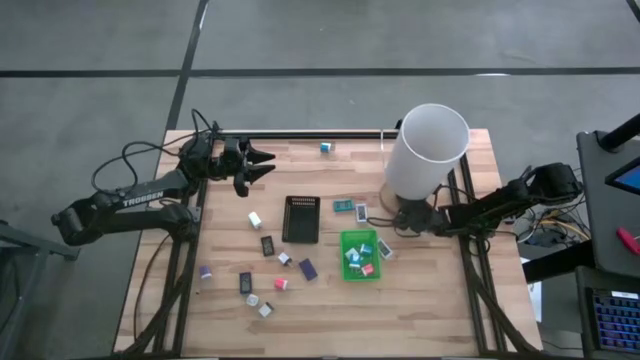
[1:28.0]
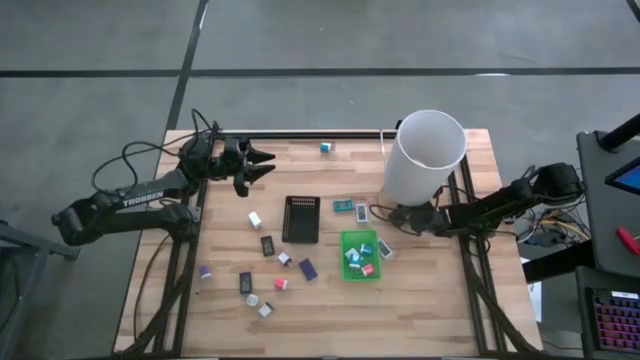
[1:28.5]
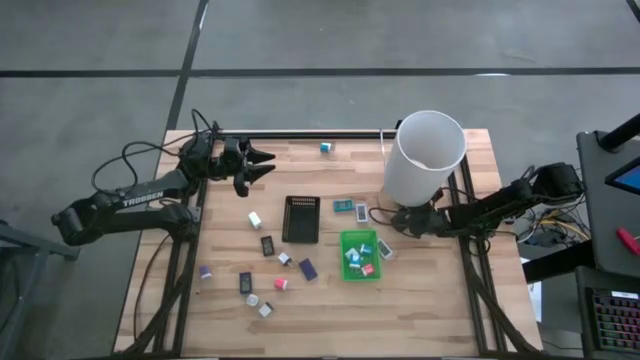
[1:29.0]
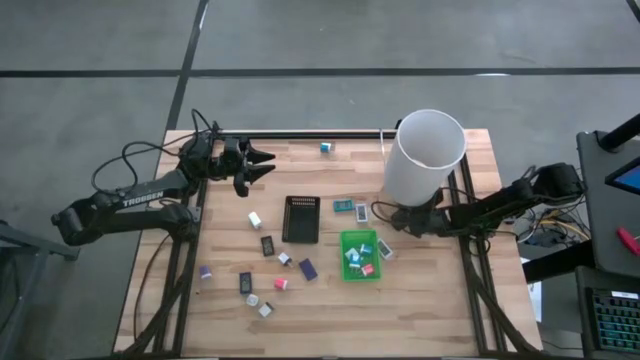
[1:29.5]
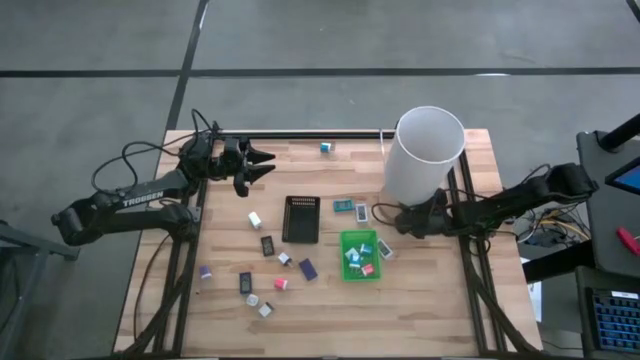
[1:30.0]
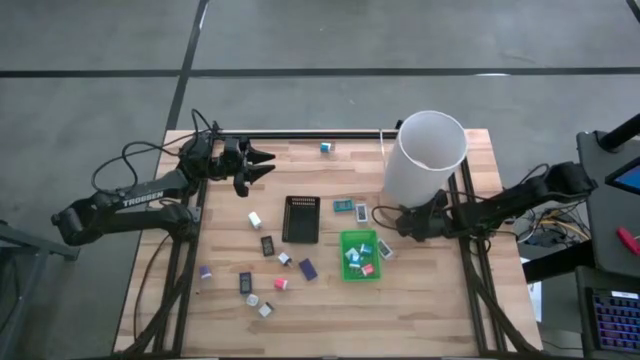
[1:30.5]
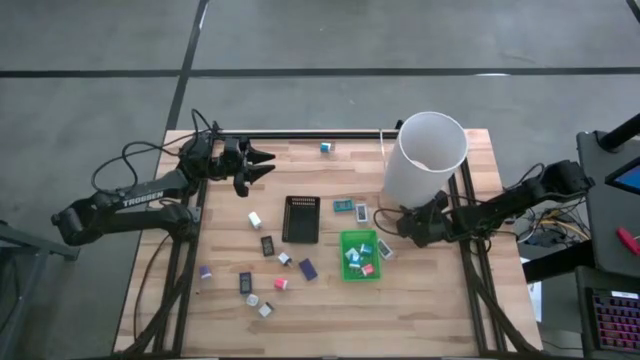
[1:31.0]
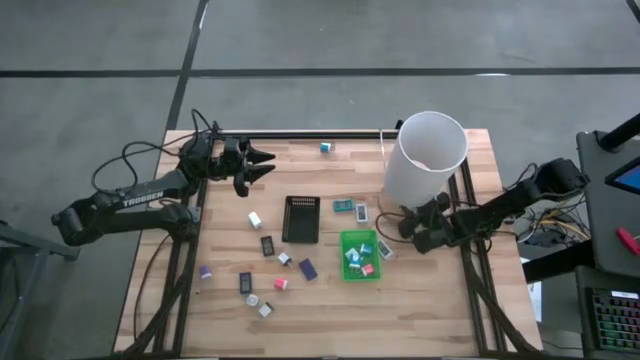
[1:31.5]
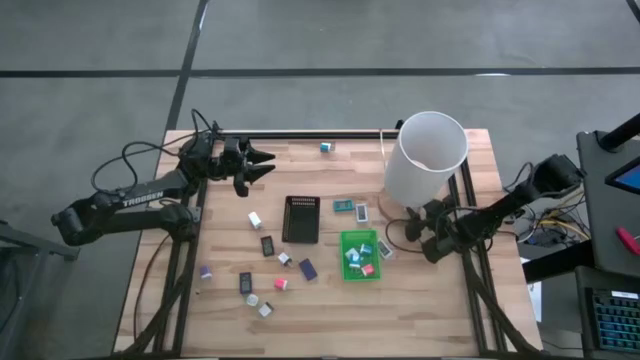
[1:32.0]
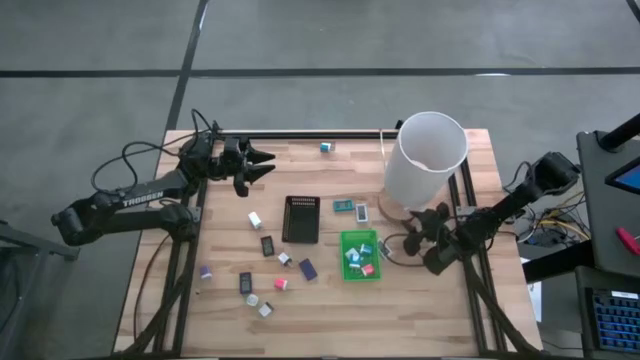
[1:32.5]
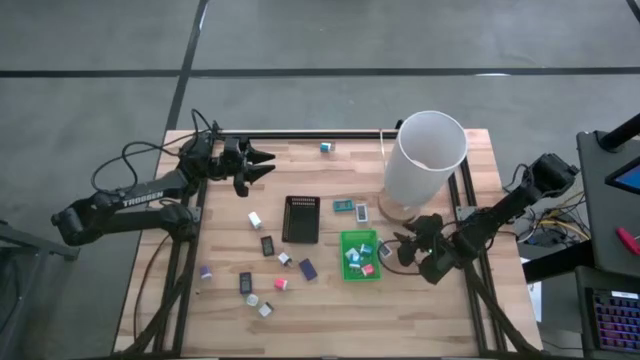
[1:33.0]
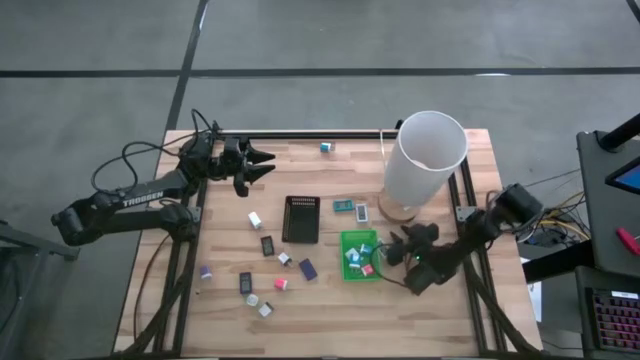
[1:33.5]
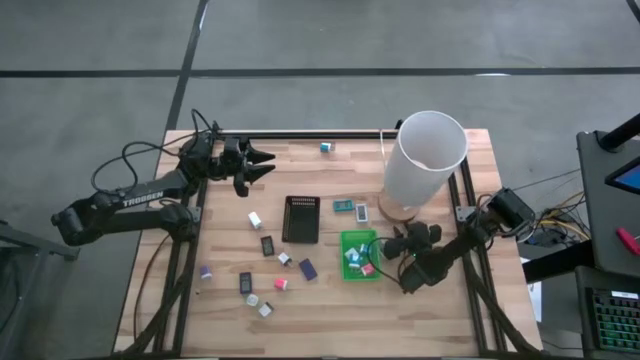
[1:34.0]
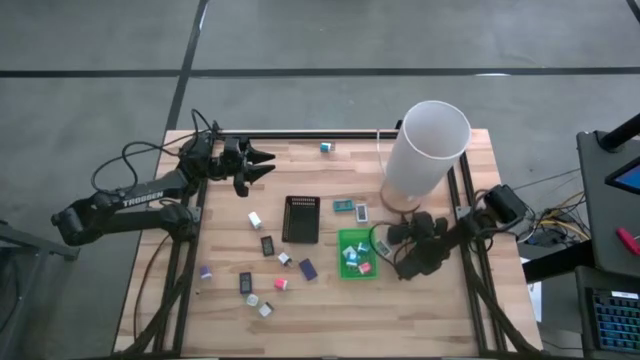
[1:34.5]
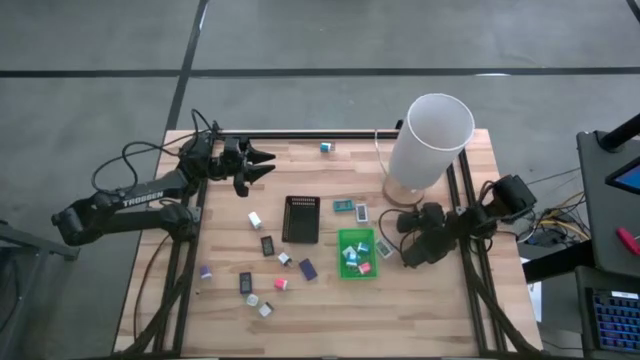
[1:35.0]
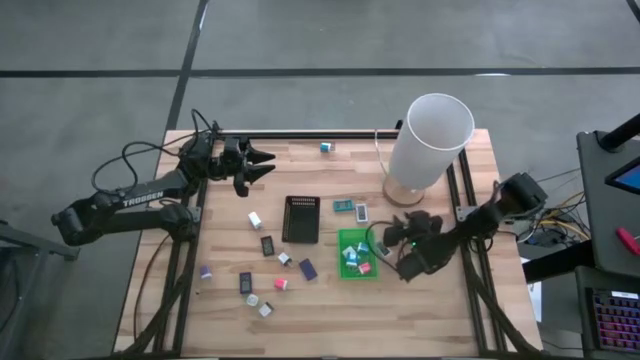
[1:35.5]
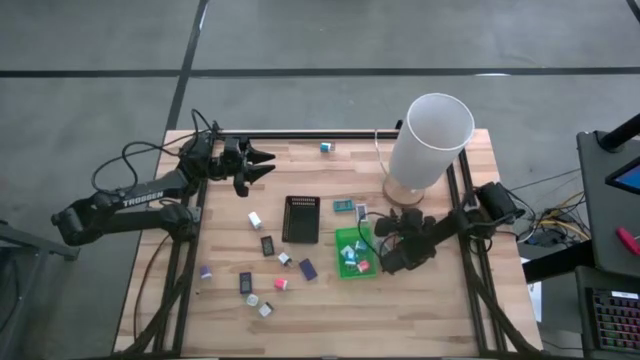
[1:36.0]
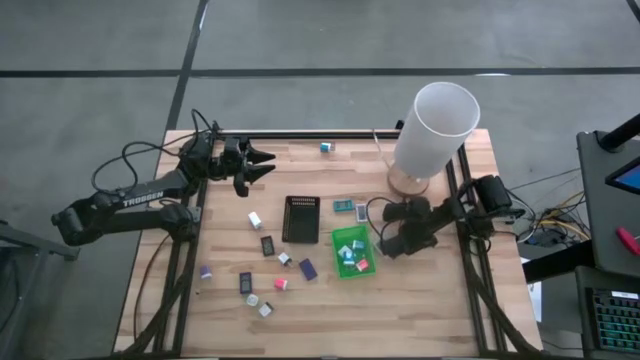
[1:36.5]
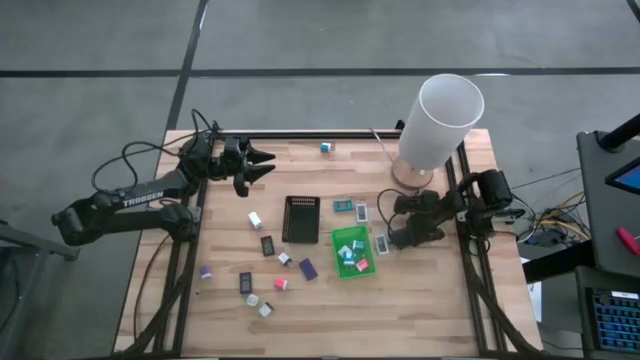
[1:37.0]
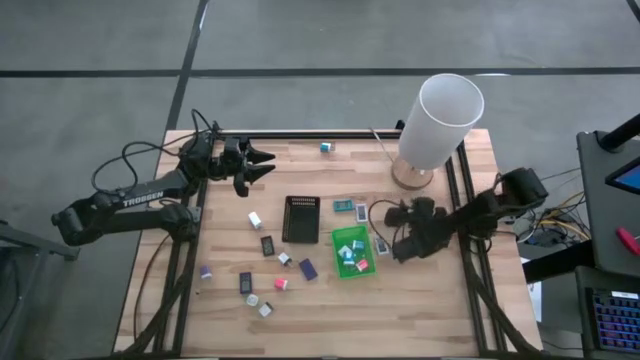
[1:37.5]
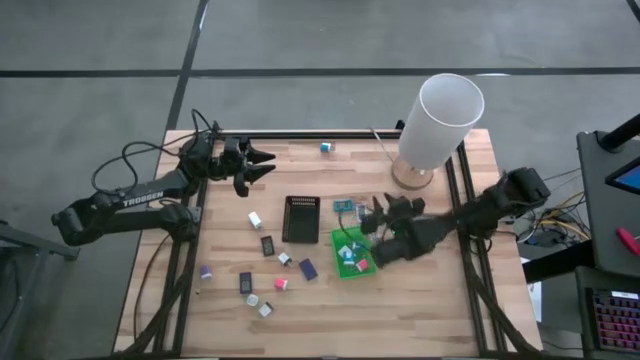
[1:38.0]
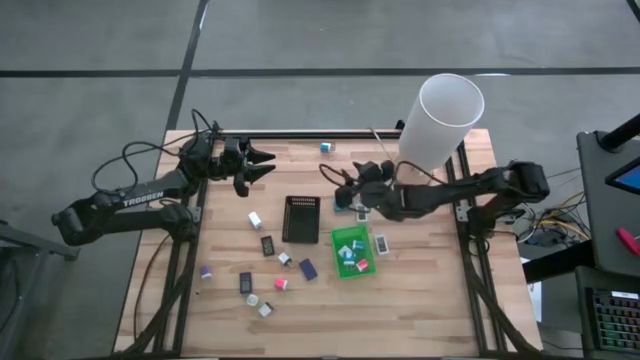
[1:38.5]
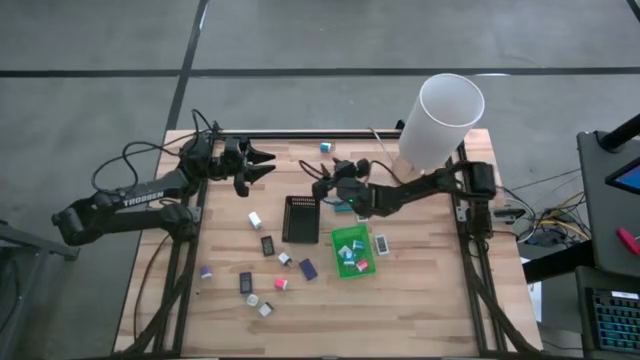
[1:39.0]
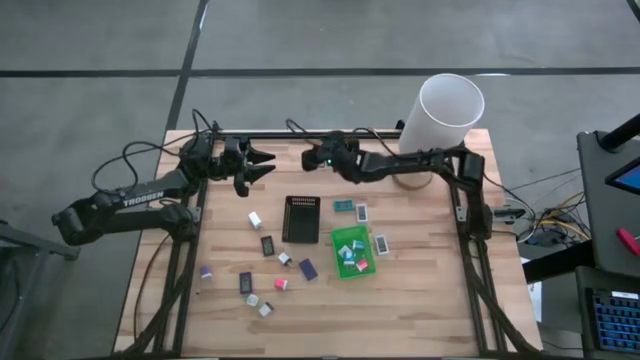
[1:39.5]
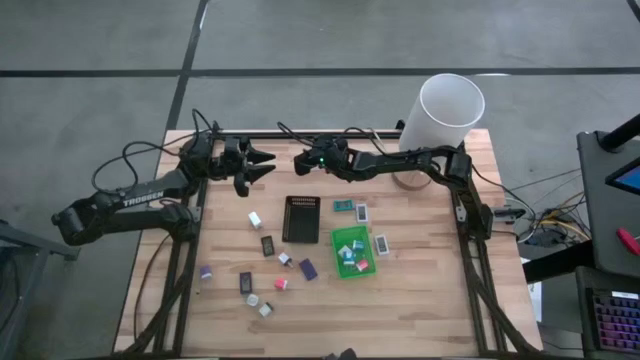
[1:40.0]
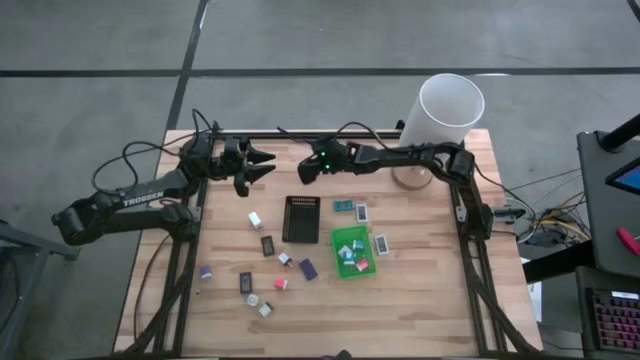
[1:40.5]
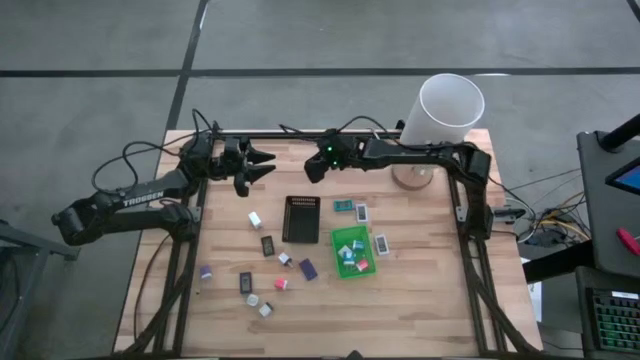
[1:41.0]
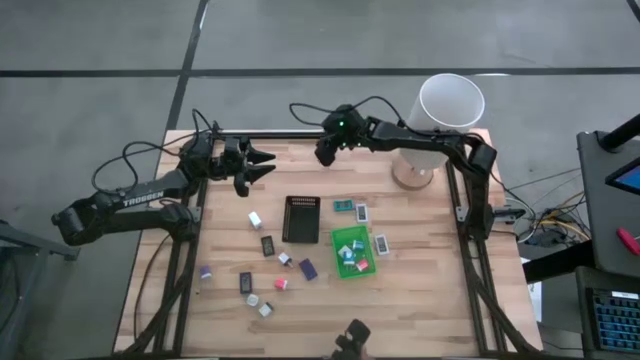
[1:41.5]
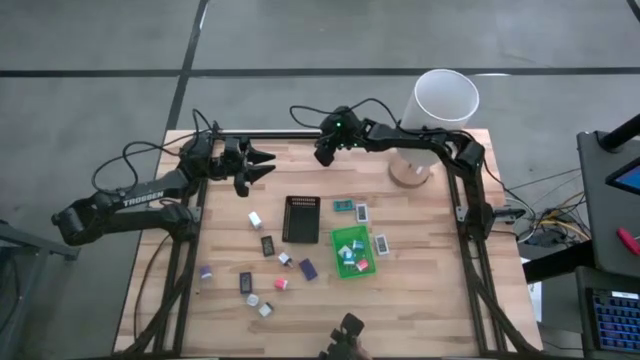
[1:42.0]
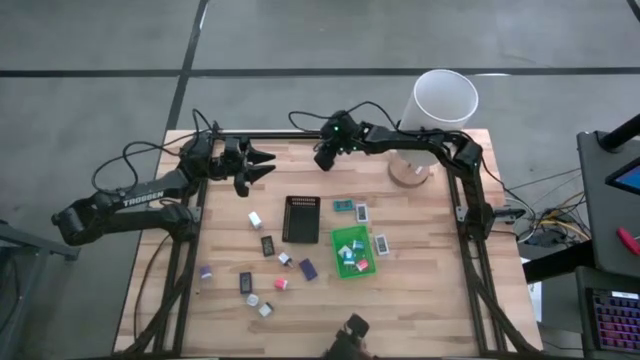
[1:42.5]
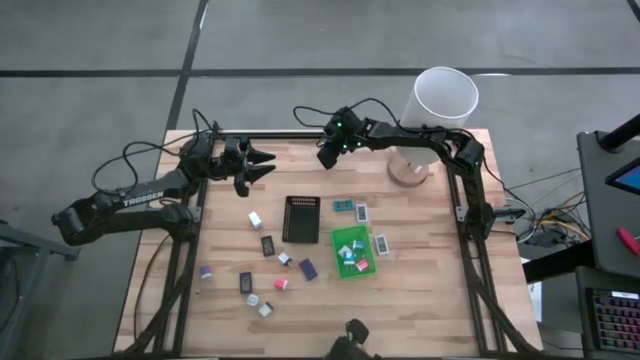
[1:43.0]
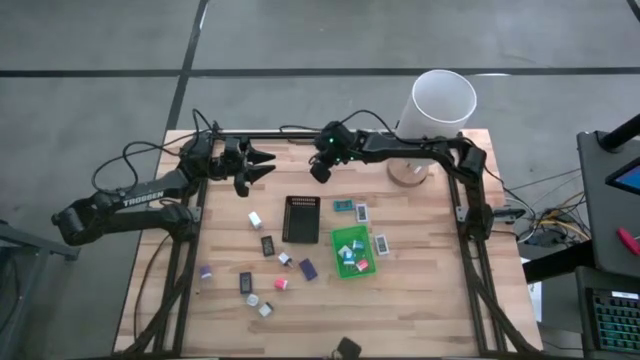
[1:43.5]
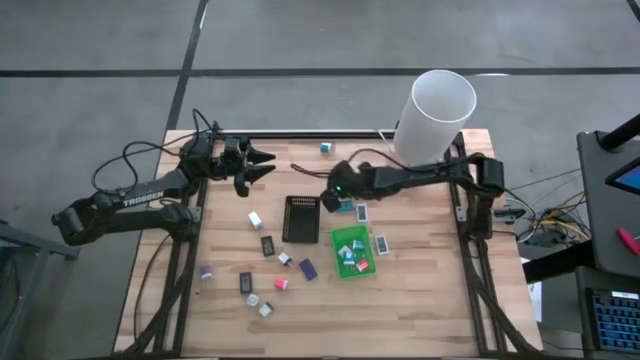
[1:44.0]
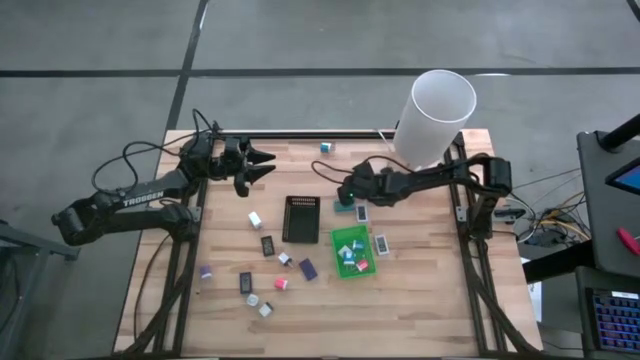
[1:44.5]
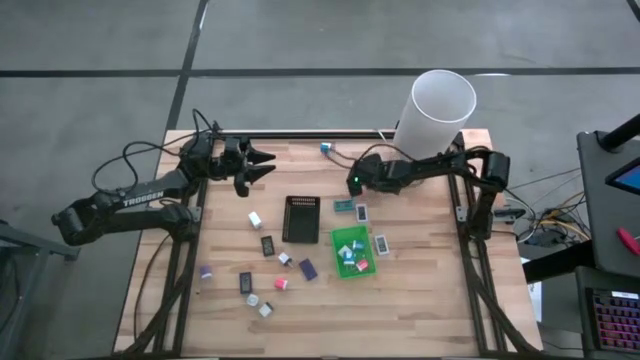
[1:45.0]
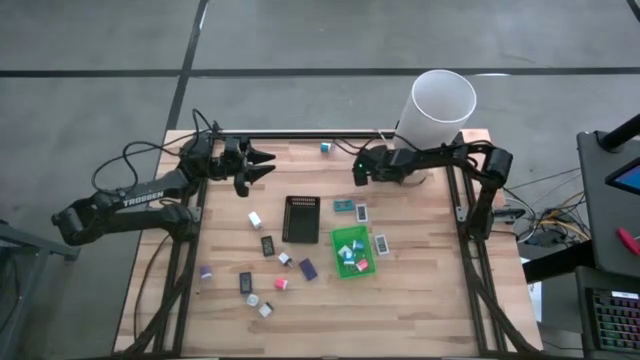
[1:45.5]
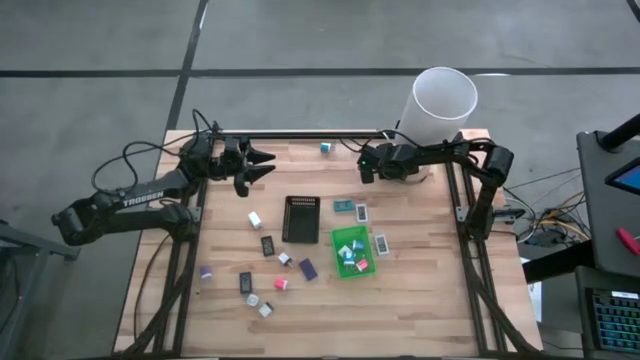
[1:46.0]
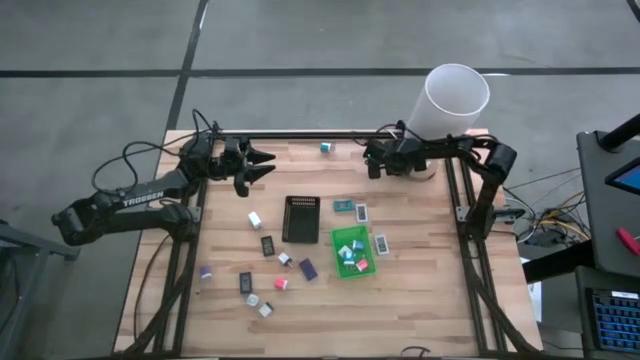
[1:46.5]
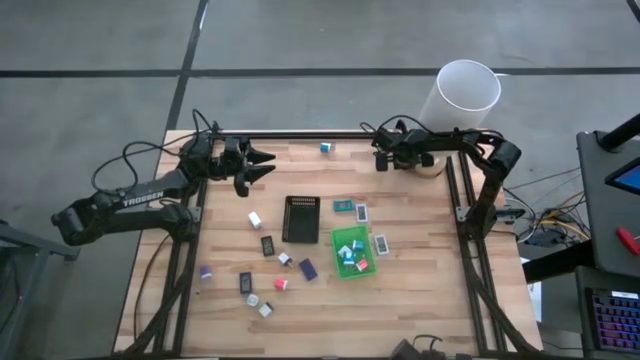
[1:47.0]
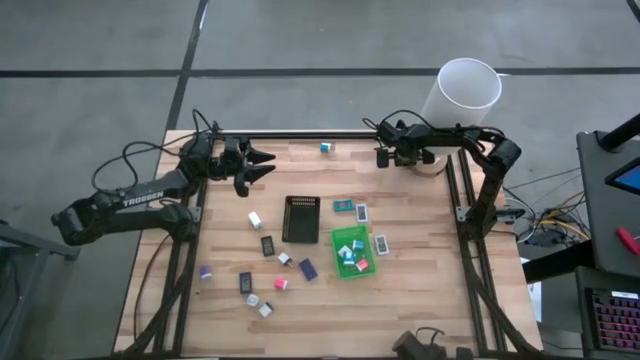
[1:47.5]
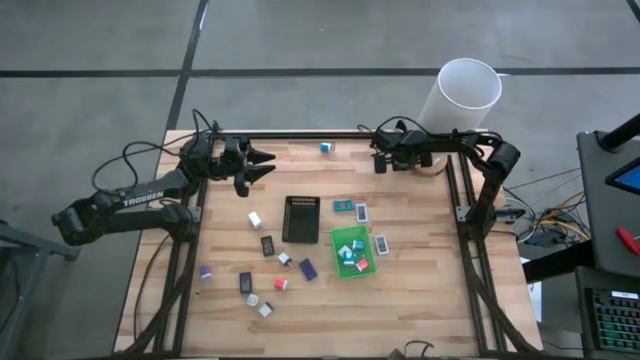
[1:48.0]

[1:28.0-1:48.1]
Task: Pick & Place Office items
Adjust the white lamp

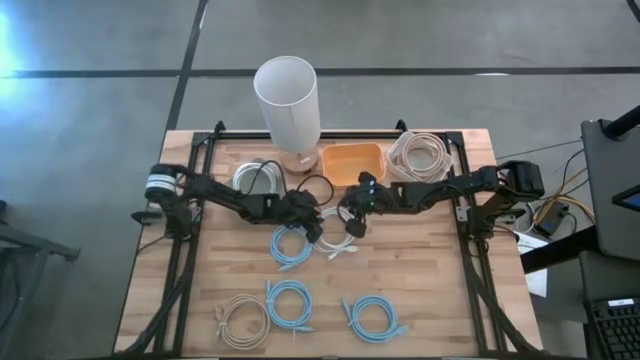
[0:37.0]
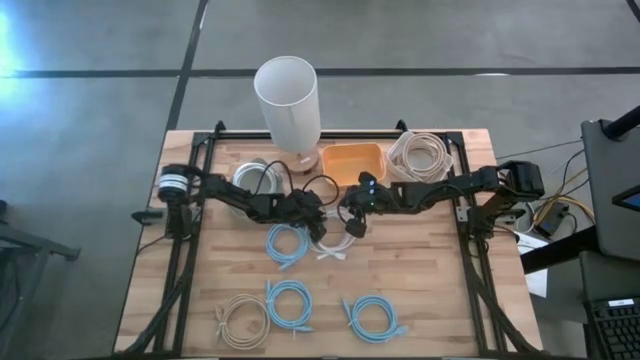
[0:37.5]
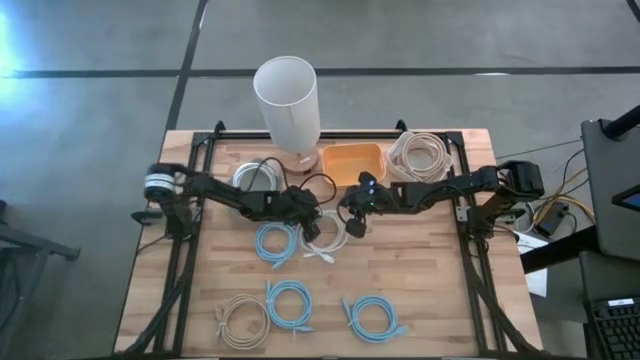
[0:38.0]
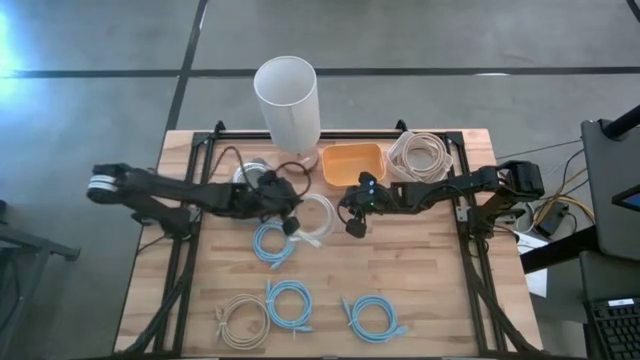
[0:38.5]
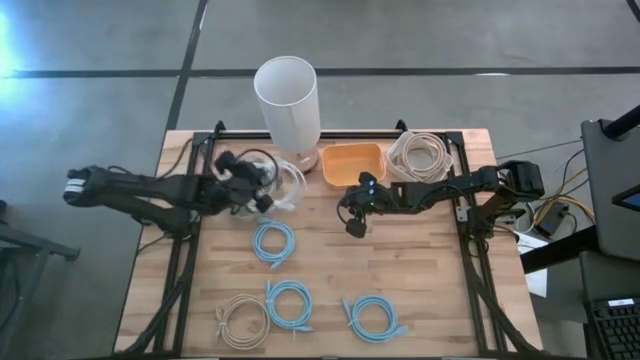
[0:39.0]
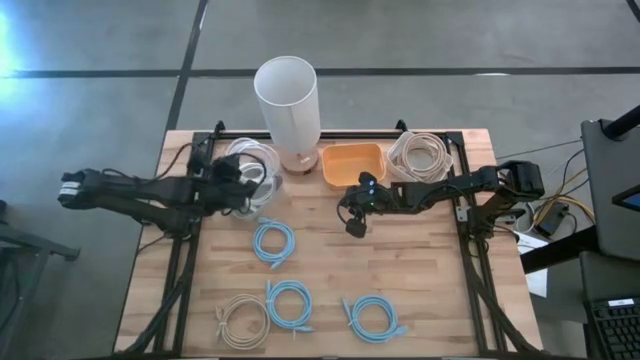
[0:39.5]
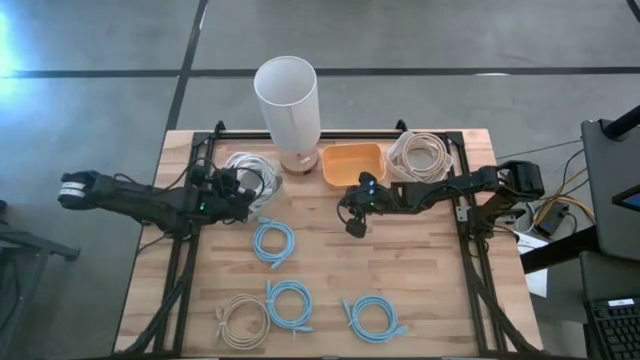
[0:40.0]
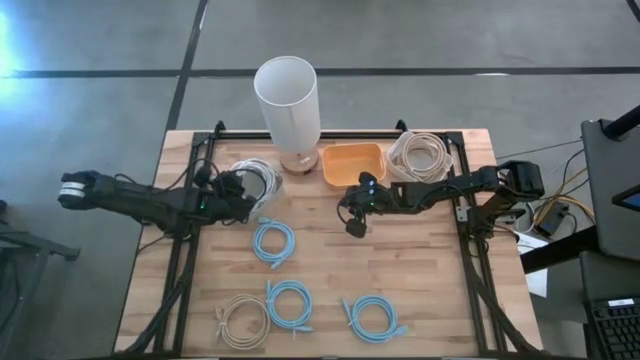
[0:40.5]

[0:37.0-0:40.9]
Task: Sort HDMI cables
Put the white HDMI cable into the grey bin
